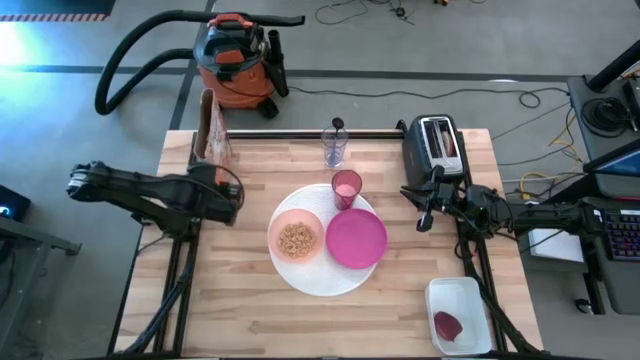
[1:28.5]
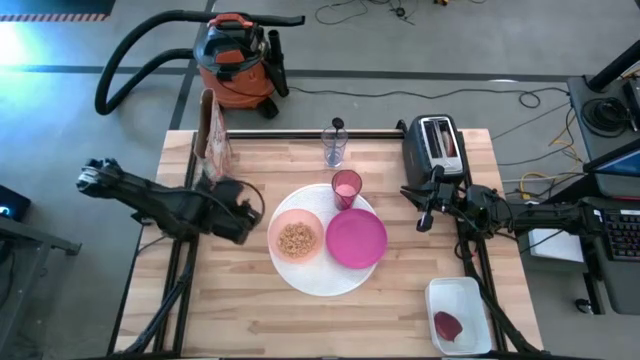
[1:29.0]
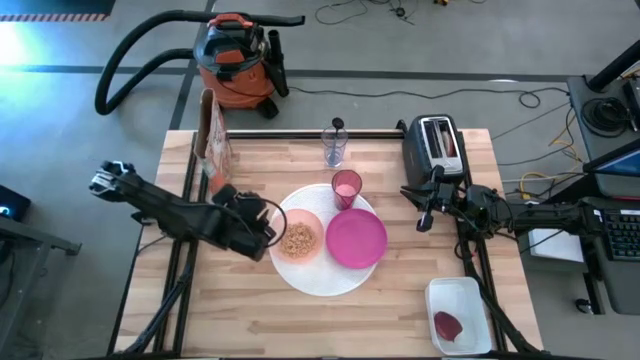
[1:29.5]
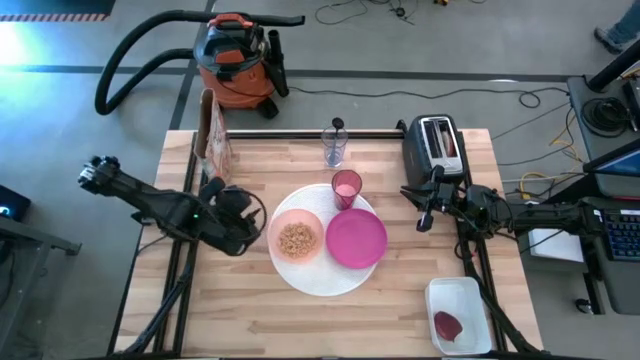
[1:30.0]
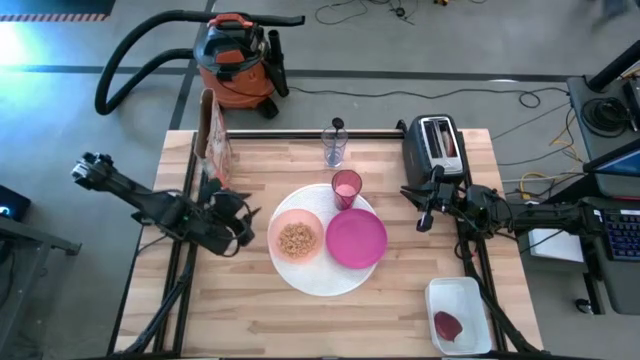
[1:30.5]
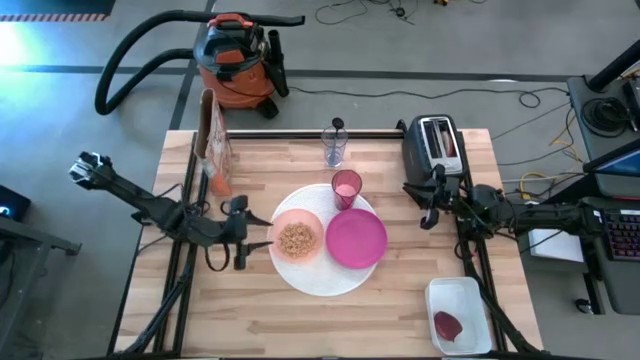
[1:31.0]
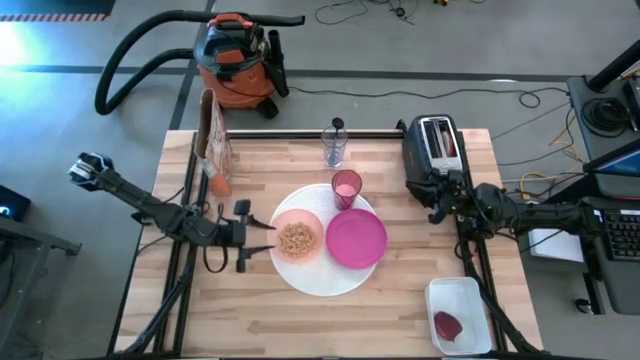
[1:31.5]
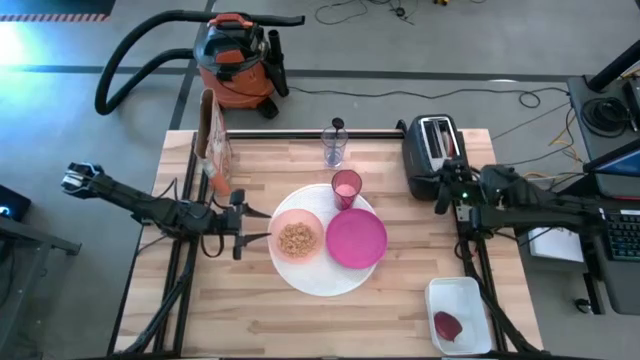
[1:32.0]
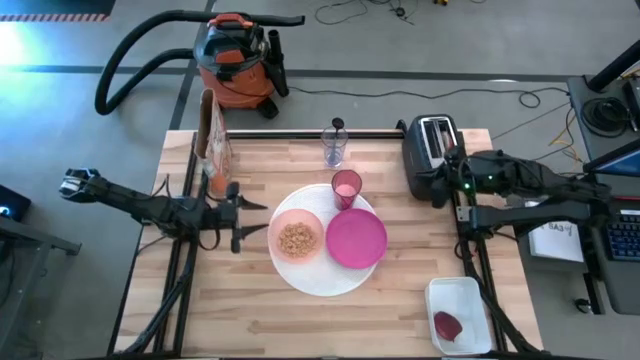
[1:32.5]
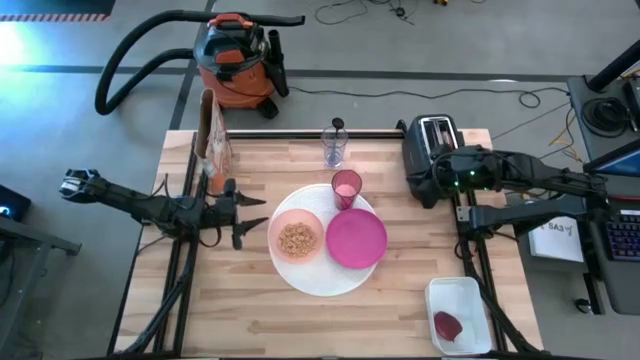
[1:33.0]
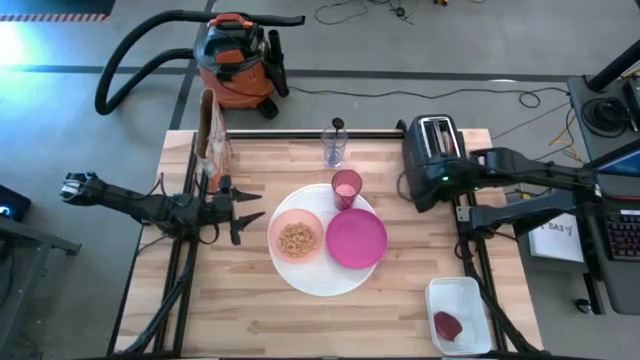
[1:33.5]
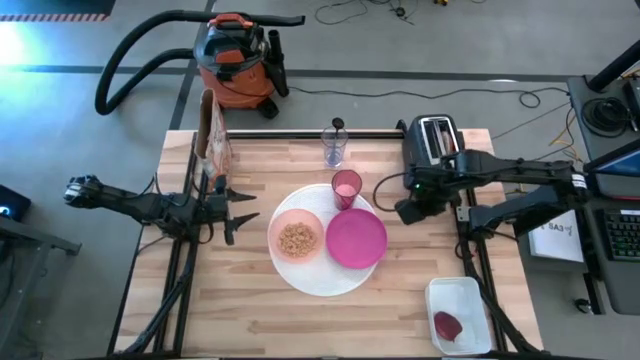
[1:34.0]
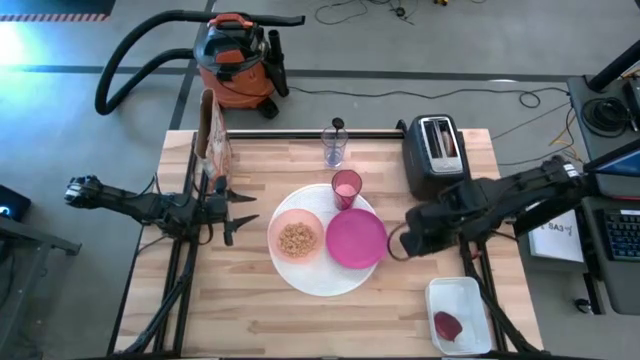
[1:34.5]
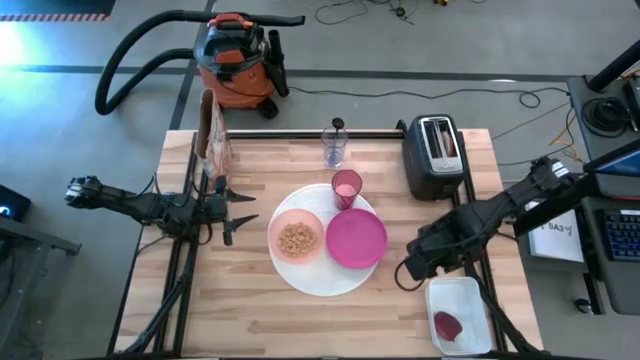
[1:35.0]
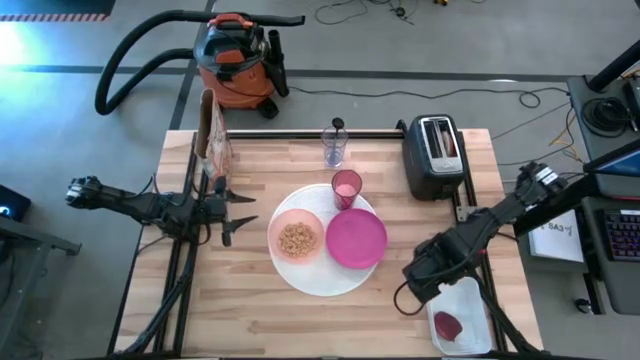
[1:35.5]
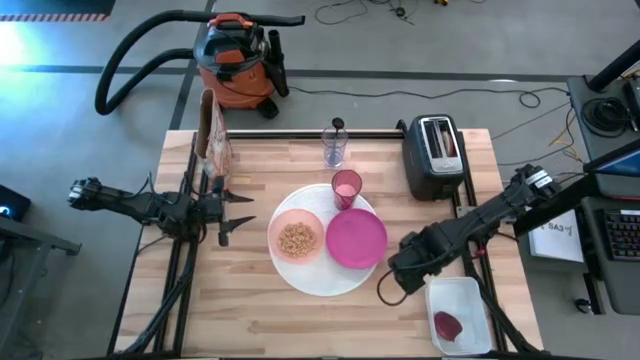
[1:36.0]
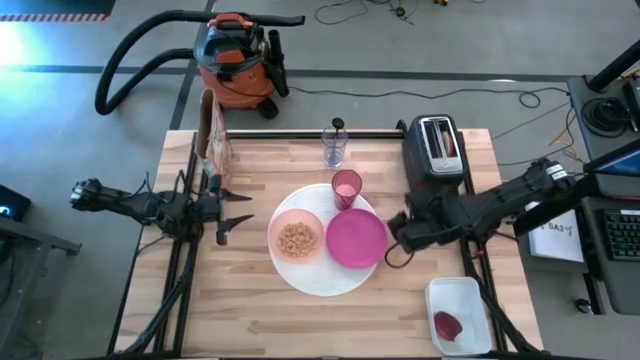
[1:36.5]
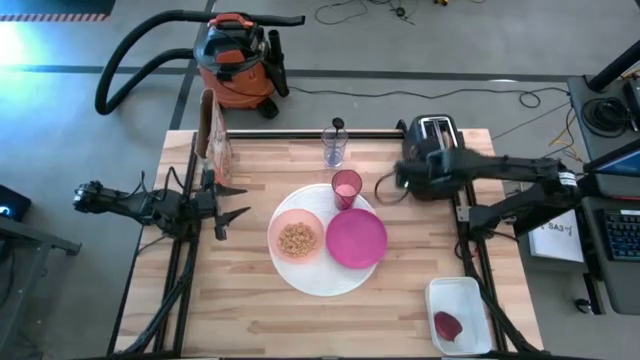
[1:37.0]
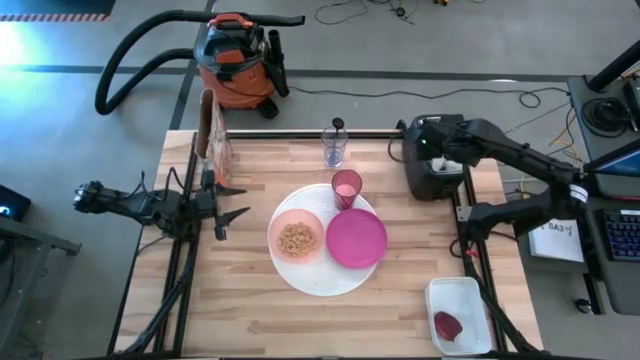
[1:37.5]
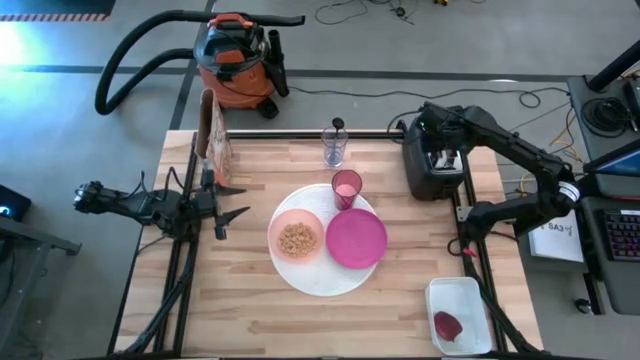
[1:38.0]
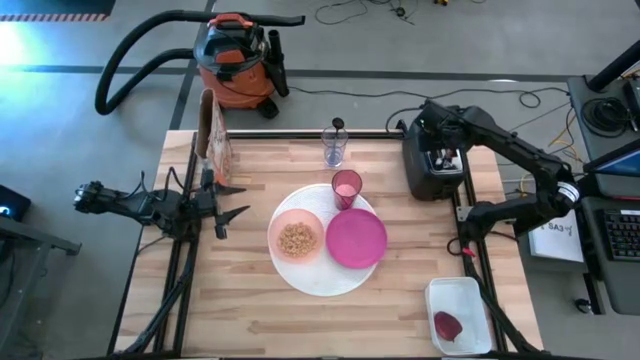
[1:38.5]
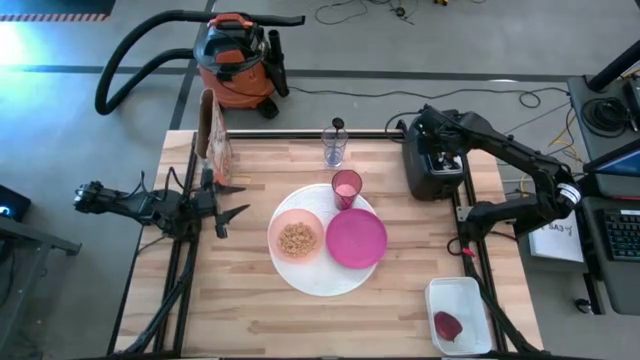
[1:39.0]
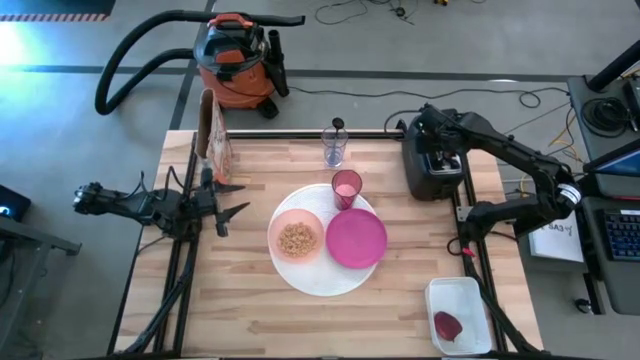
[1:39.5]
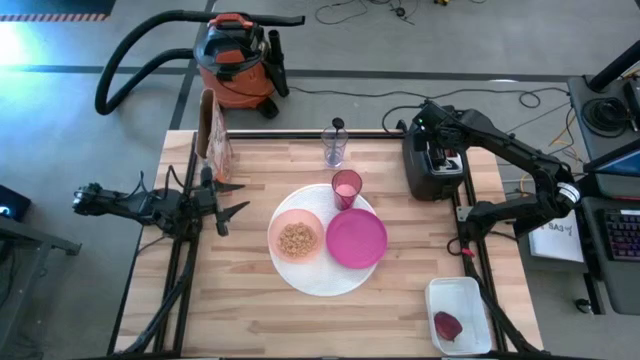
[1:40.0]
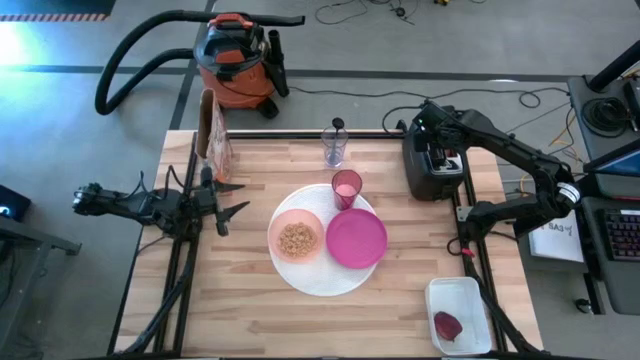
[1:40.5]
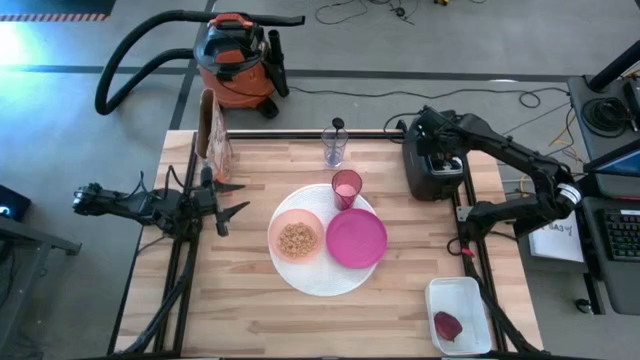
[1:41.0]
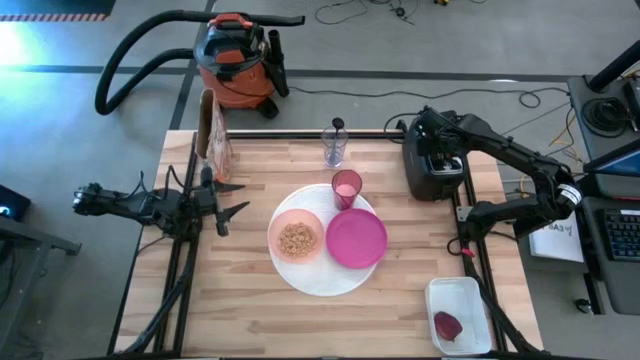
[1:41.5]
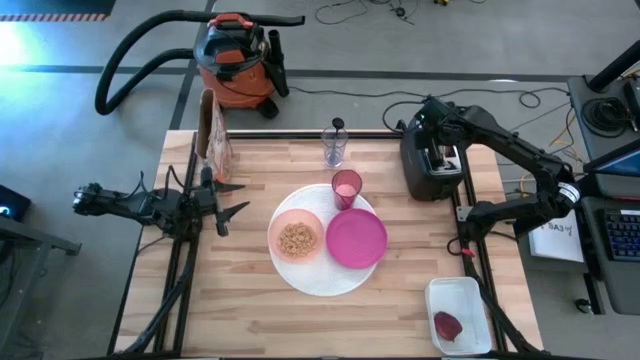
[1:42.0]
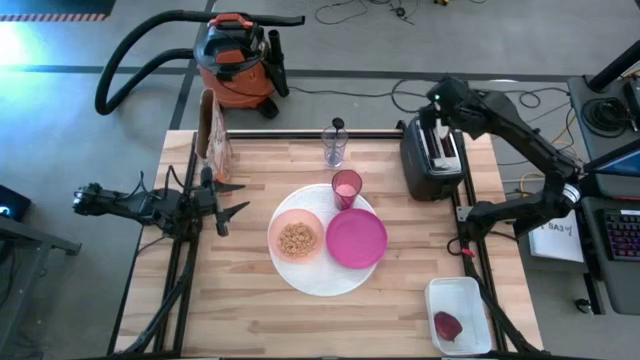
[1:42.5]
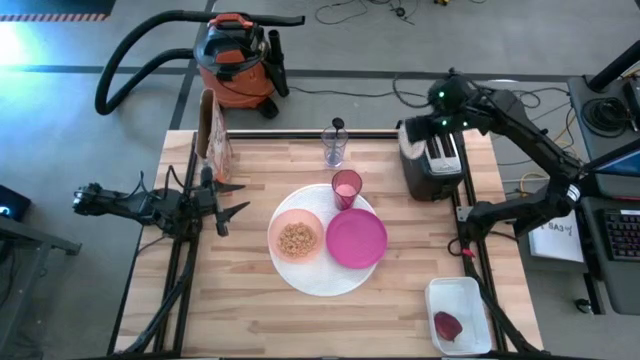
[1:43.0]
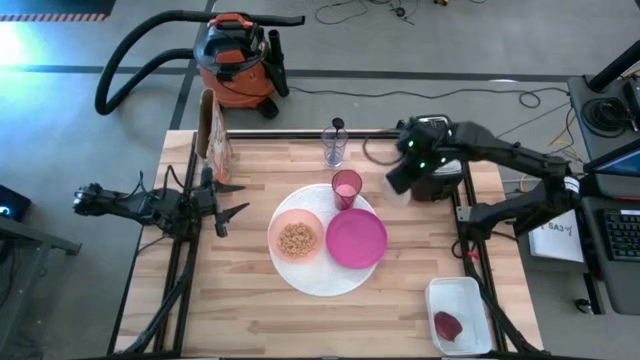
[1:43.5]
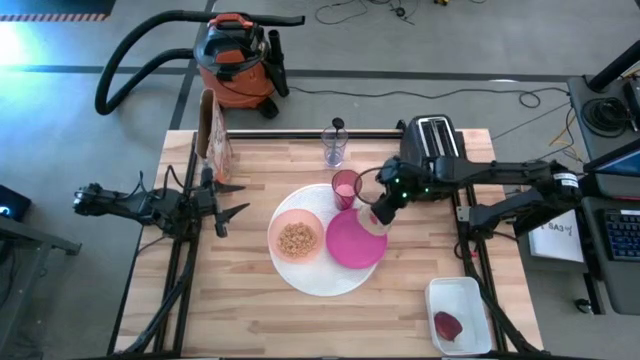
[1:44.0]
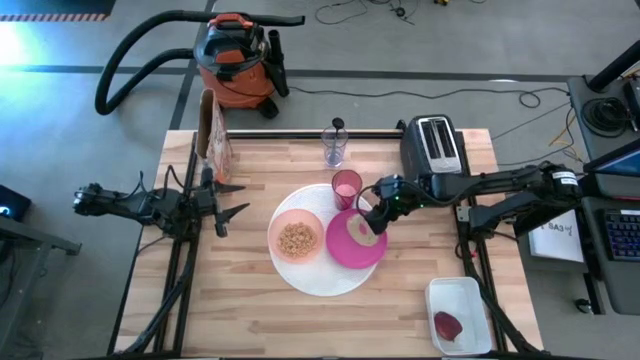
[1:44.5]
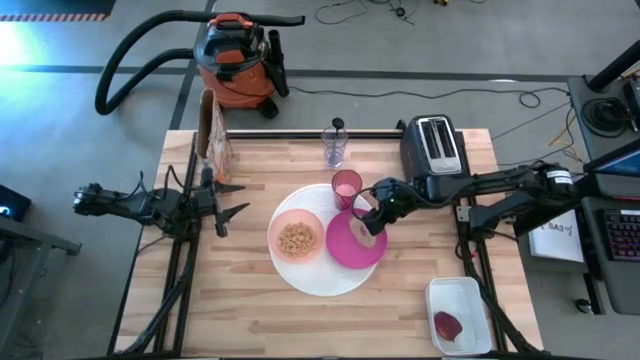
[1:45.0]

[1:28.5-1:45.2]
Task: Arrange a breakfast setting
Put the bagel on the pink plate

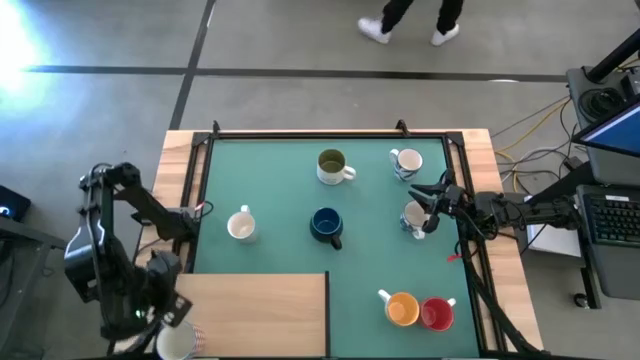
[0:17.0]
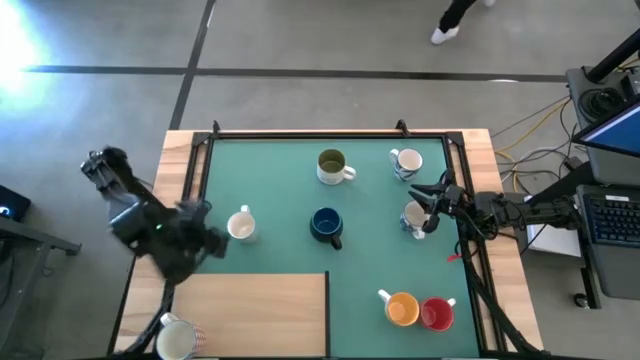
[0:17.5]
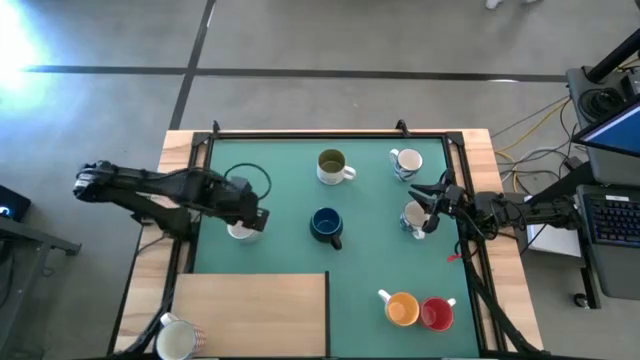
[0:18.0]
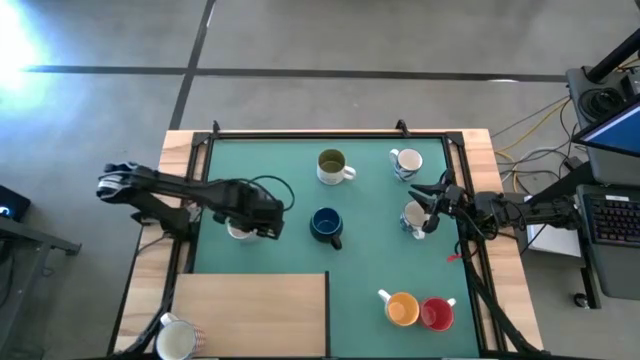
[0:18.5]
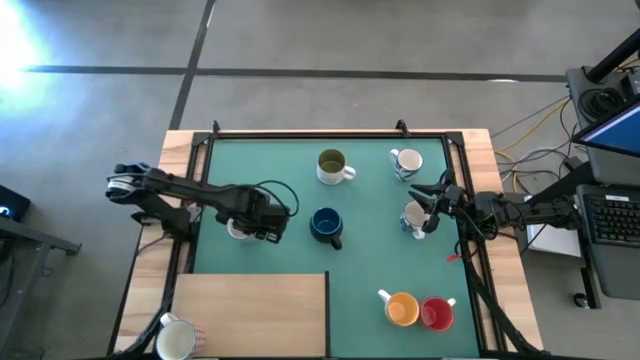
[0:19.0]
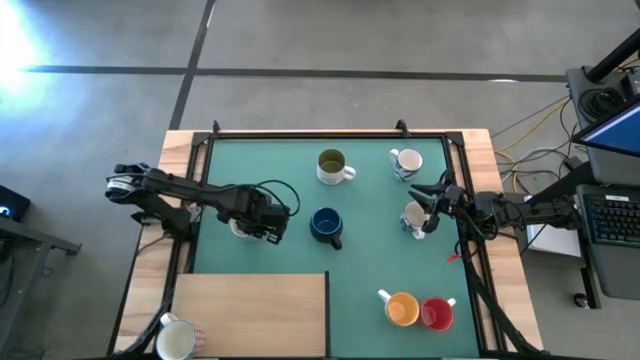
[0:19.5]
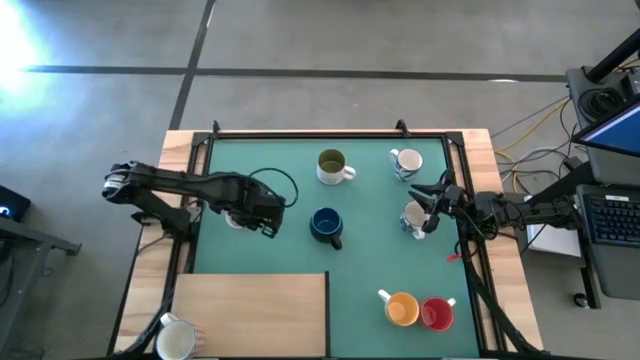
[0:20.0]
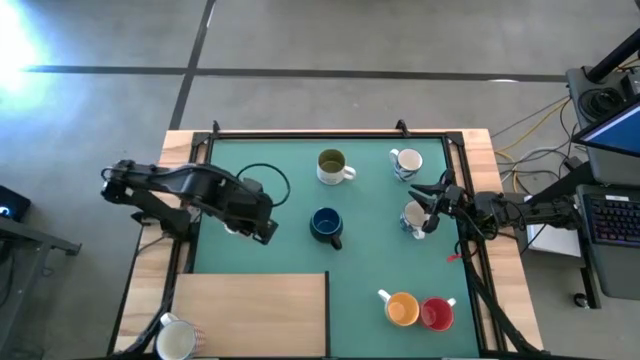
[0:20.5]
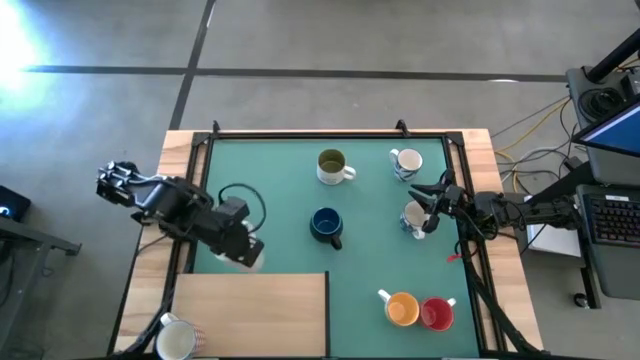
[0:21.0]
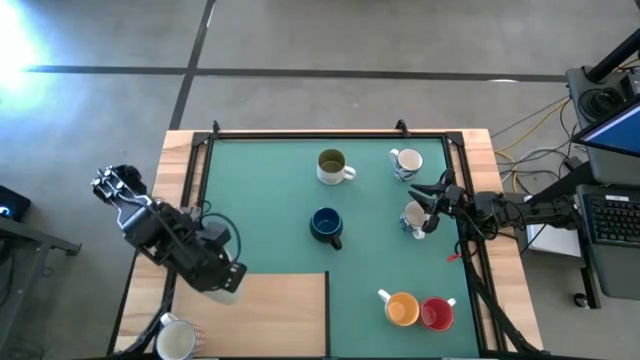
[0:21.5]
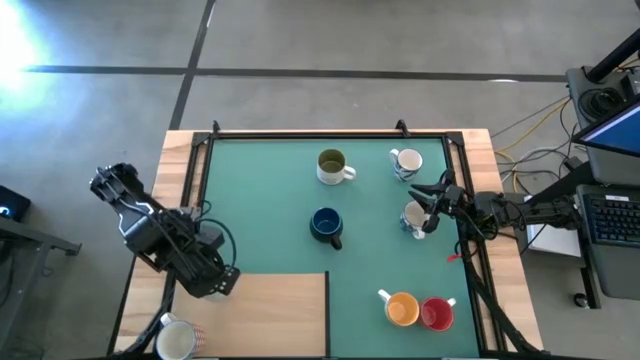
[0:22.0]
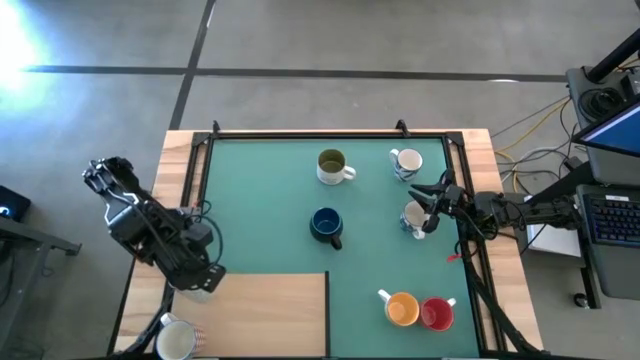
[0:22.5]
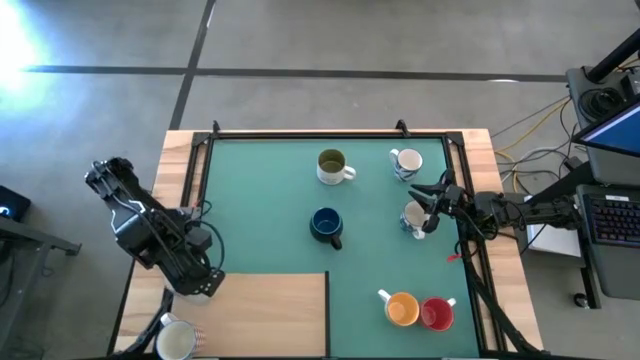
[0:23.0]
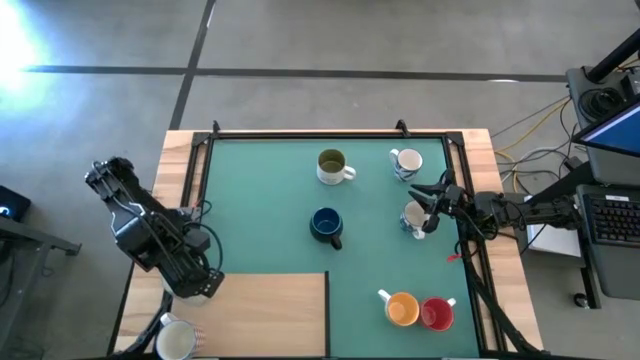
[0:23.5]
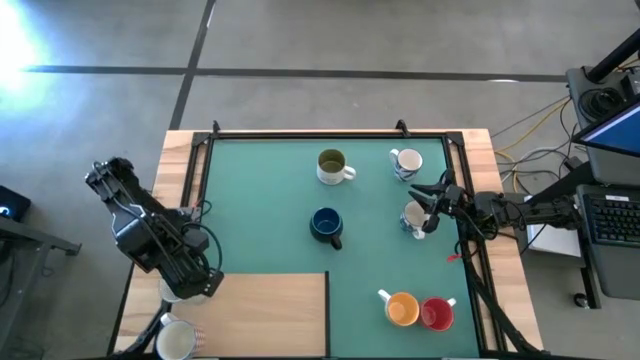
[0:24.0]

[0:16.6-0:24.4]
Task: Place coffee mugs
Put the green patterned mug on the shelf
